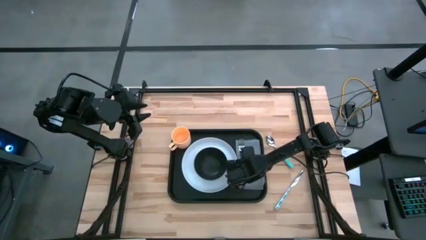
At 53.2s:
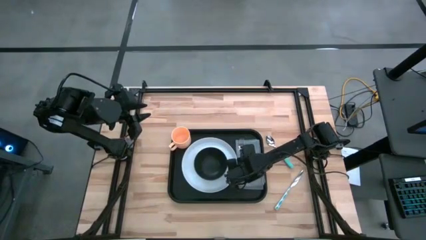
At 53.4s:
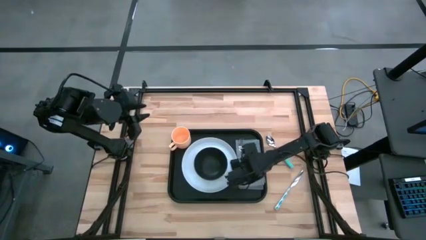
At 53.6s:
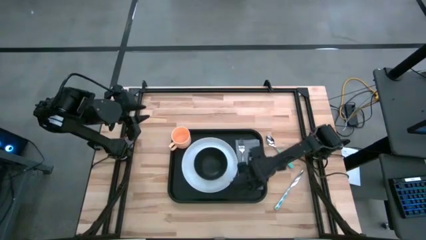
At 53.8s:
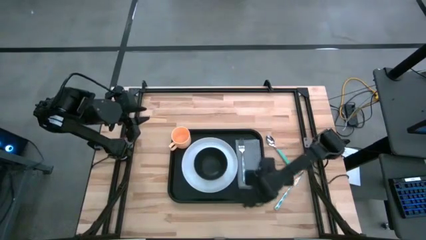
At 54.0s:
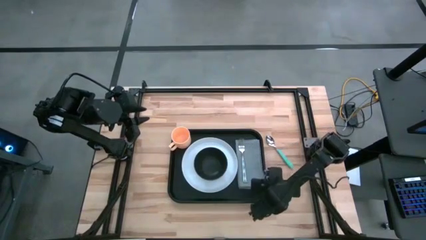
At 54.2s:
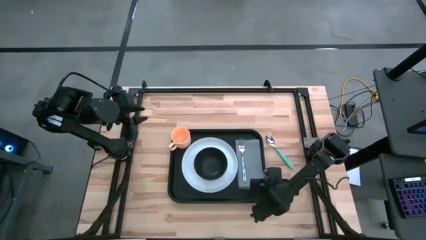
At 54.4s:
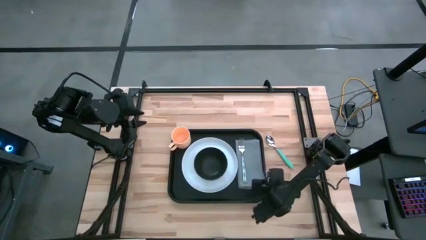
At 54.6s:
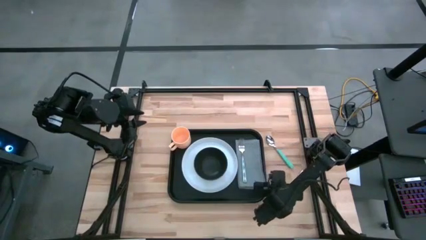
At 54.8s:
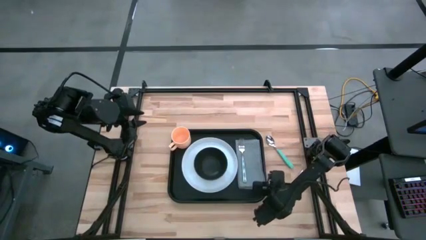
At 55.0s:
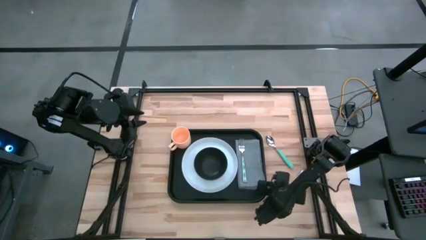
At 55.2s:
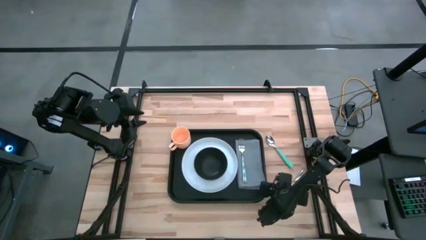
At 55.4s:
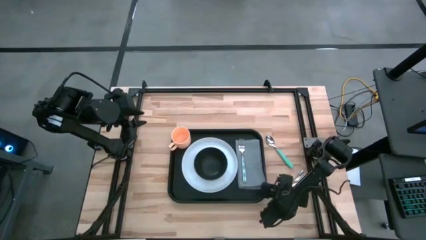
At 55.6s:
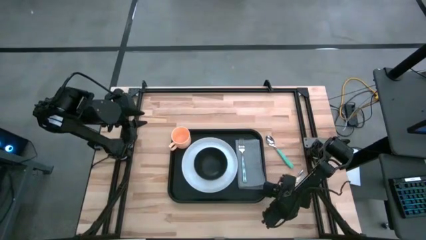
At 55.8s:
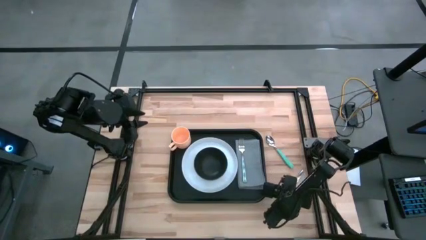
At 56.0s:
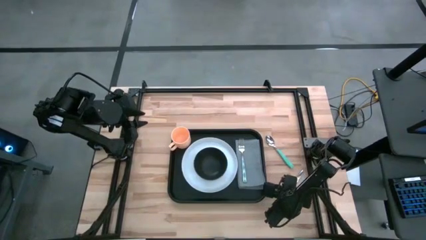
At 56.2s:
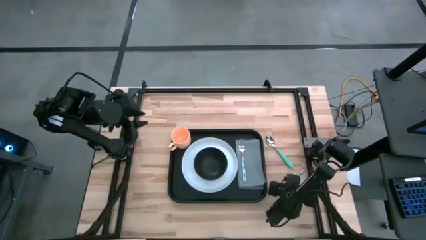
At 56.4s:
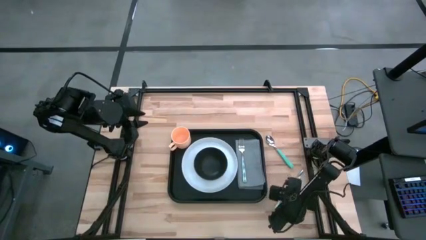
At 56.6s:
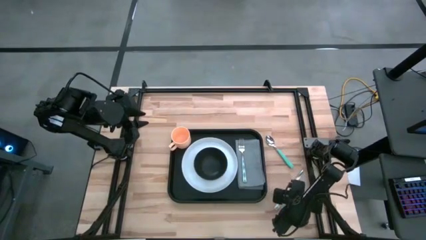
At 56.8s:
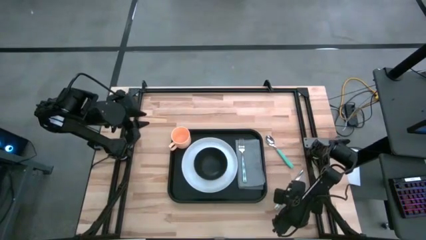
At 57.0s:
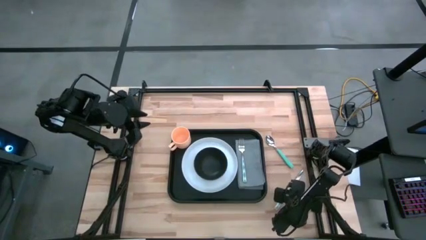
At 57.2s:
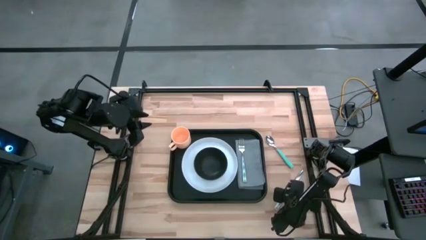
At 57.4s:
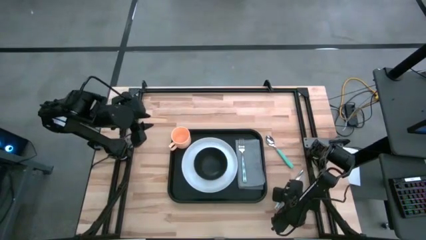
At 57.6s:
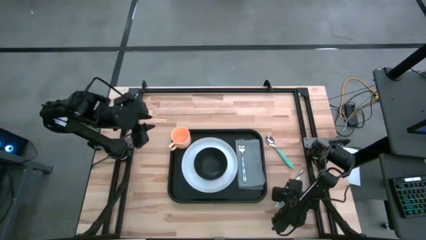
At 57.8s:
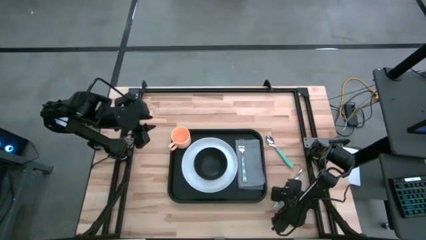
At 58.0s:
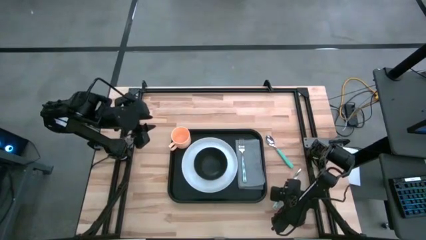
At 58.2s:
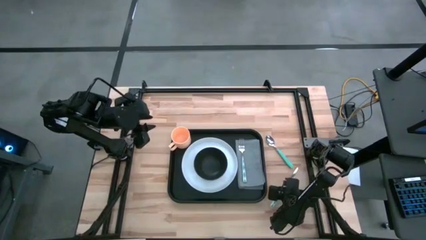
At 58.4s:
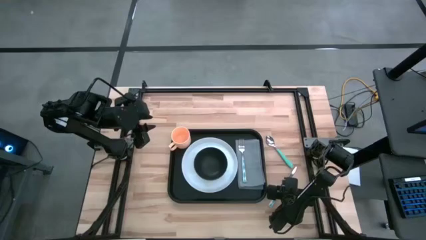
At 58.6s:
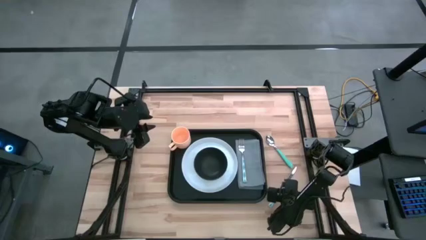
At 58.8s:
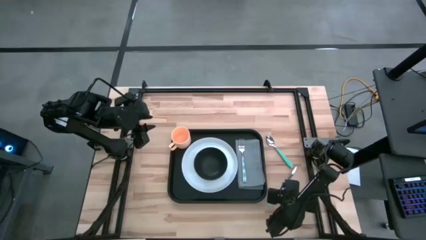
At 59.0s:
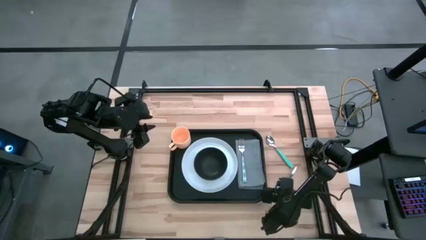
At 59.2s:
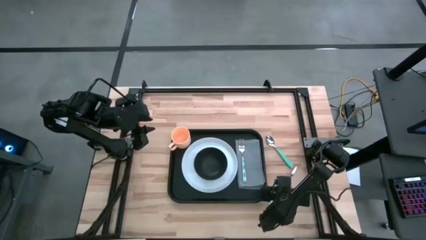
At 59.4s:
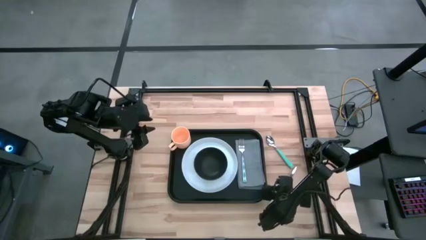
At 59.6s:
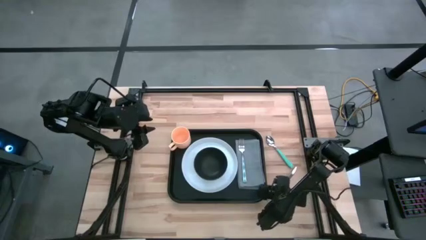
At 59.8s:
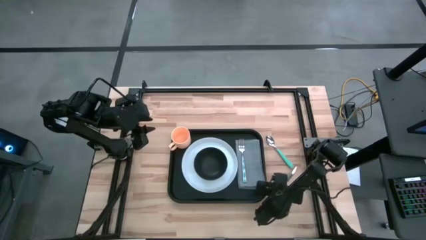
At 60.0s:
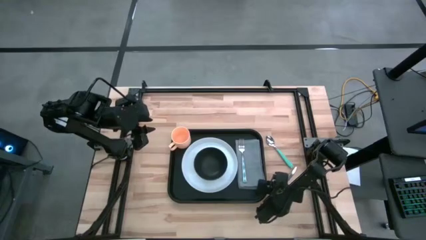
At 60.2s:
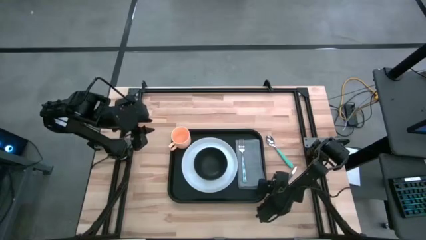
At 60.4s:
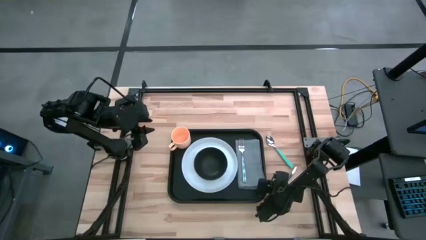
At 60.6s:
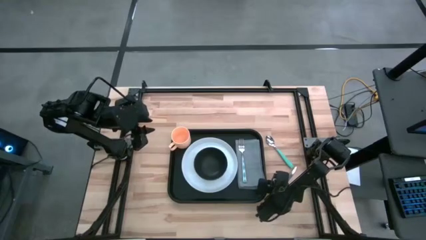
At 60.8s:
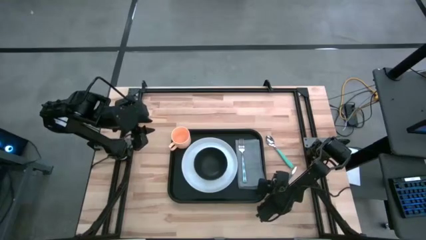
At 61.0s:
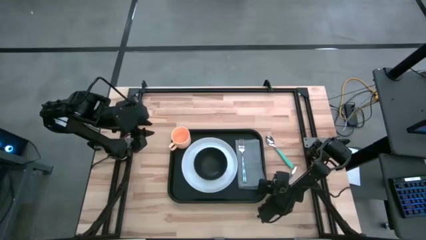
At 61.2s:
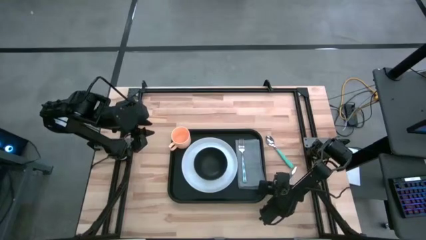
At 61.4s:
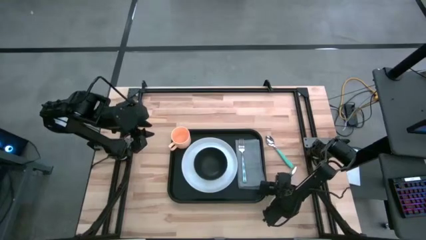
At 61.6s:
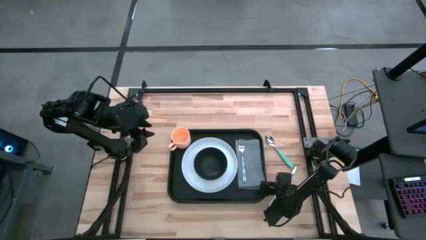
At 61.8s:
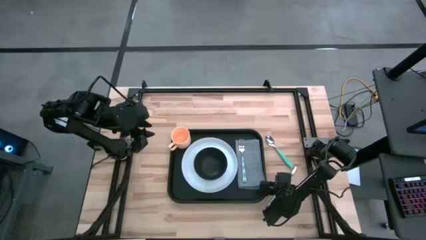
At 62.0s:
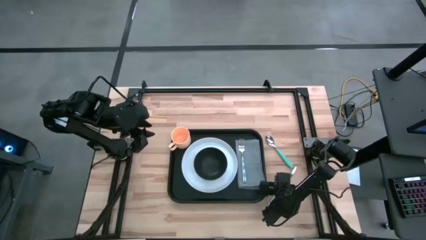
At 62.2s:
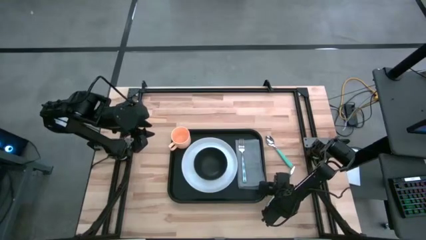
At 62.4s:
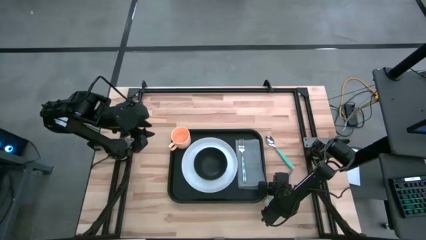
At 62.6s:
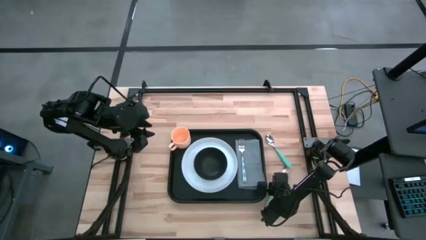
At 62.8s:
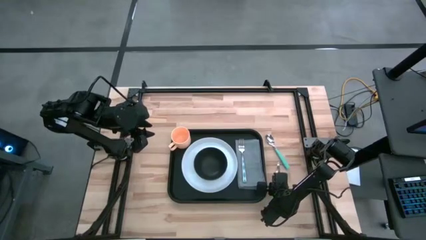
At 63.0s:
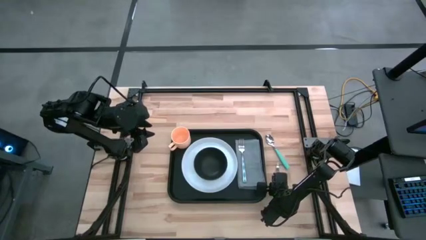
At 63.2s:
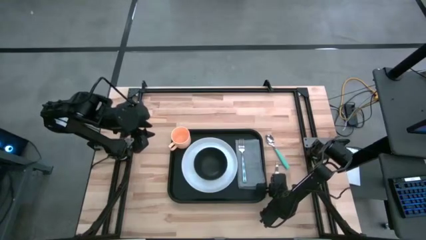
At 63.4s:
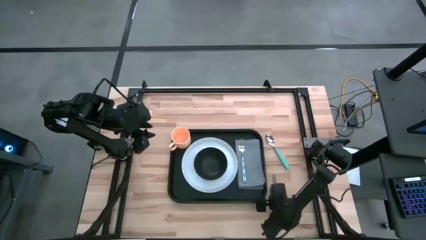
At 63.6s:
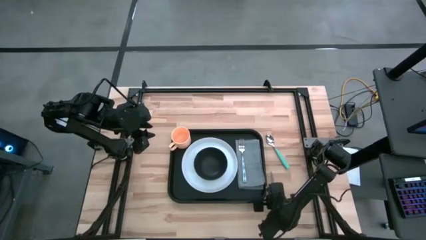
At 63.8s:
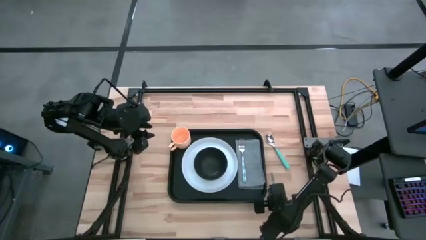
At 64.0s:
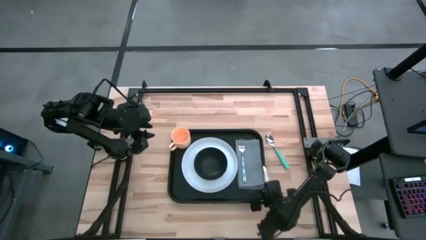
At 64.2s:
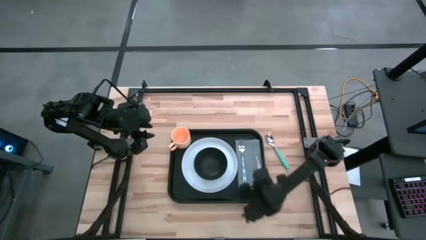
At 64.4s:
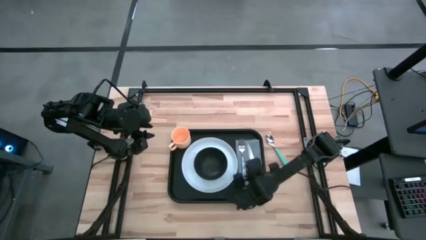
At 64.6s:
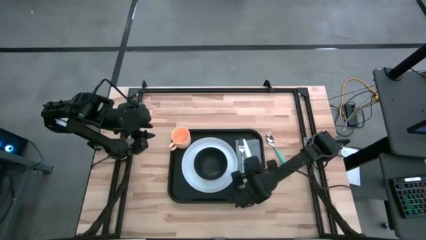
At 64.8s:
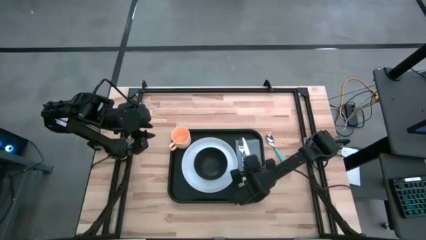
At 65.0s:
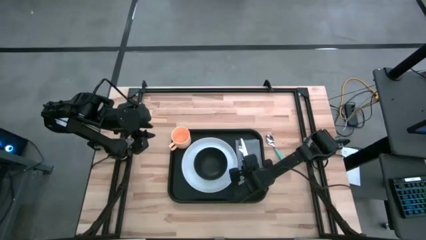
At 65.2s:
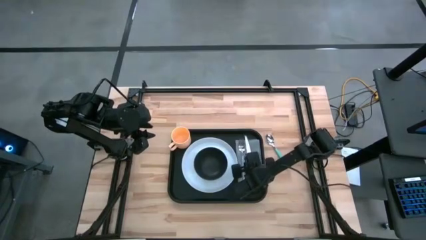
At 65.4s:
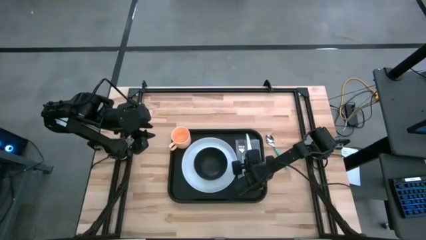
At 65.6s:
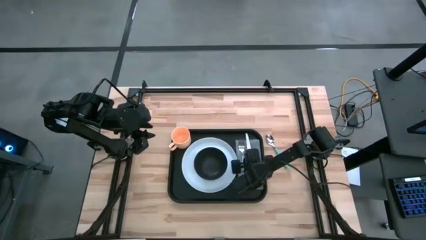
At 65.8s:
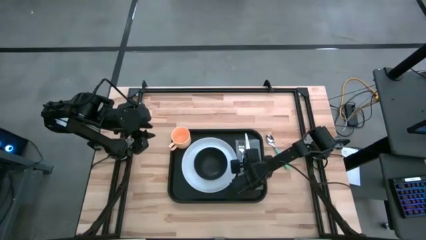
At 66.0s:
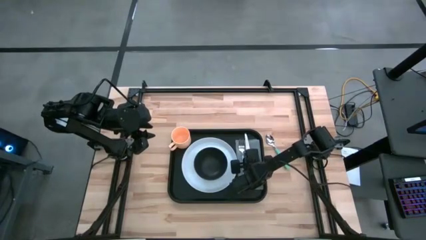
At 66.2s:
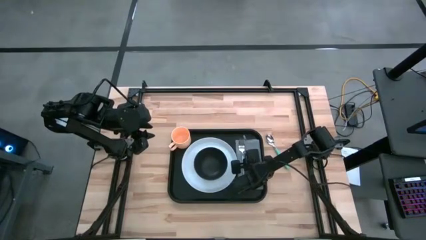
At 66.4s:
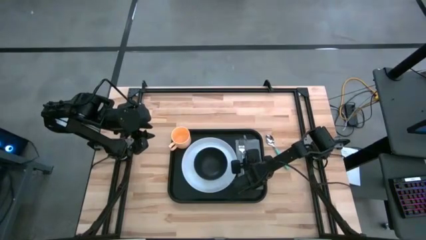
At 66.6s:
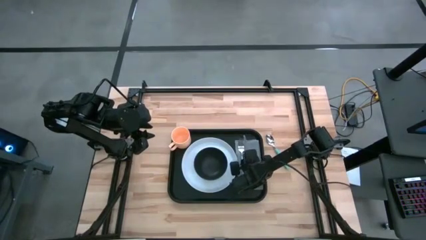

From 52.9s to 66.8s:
Task: Set up tray
Put the blue patterned knife on top of the gray napkin to the right of the blue patterned fork

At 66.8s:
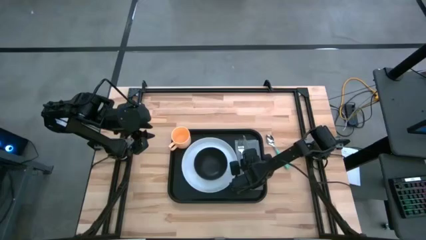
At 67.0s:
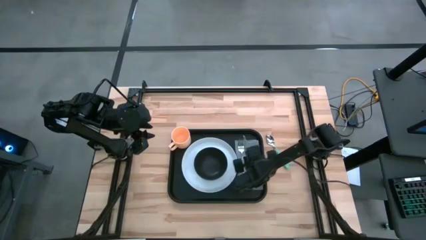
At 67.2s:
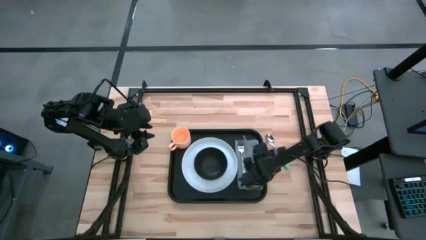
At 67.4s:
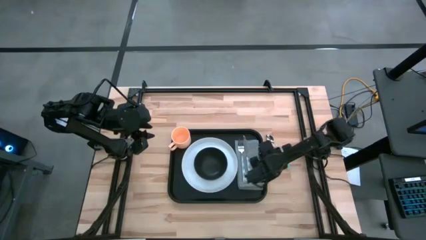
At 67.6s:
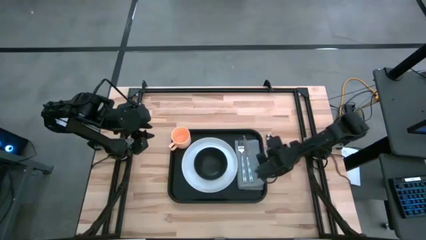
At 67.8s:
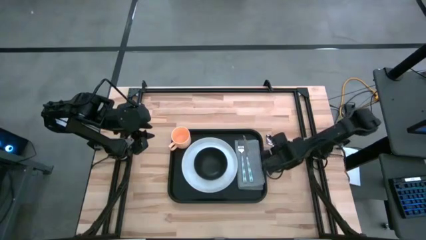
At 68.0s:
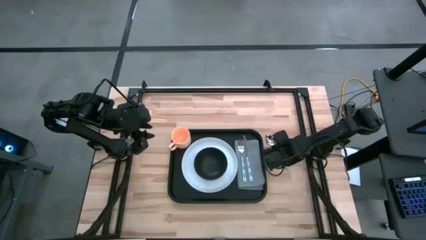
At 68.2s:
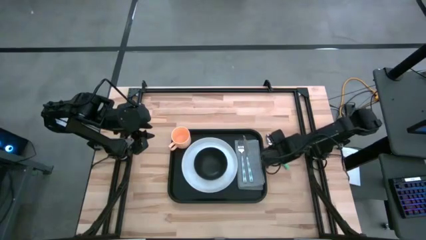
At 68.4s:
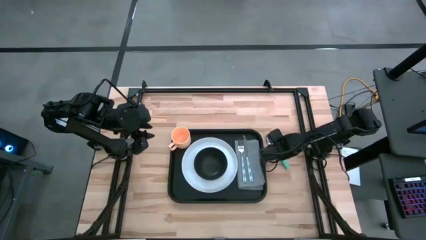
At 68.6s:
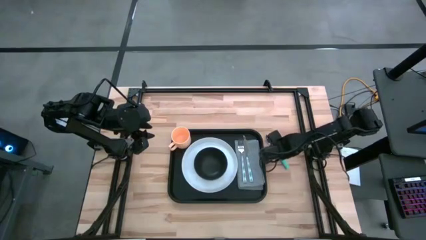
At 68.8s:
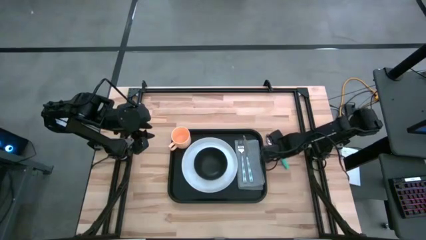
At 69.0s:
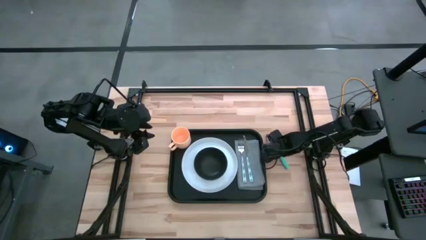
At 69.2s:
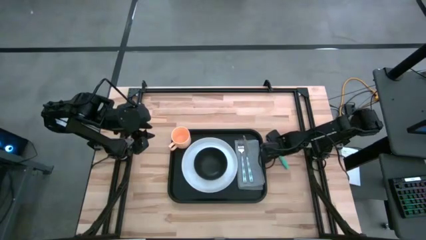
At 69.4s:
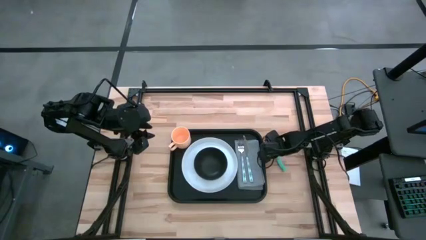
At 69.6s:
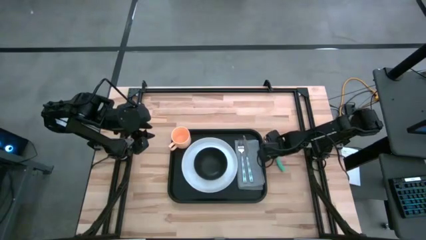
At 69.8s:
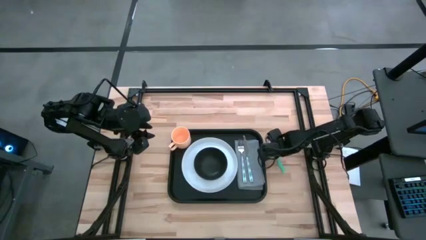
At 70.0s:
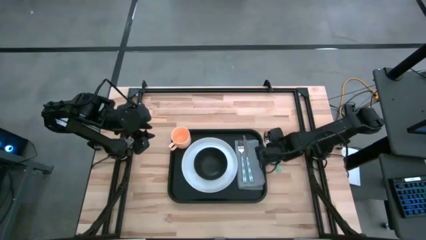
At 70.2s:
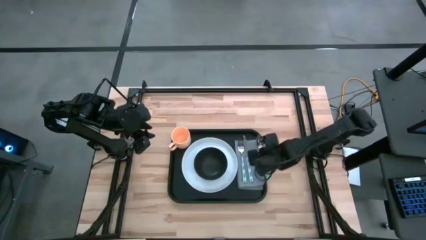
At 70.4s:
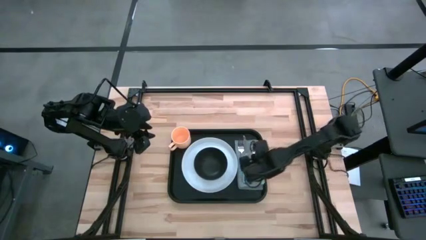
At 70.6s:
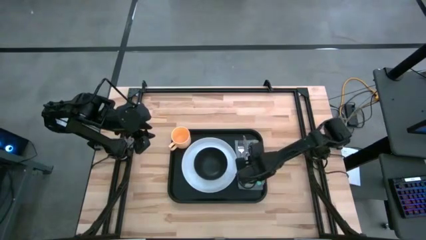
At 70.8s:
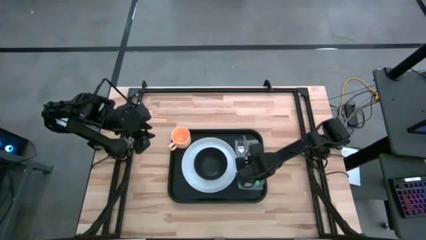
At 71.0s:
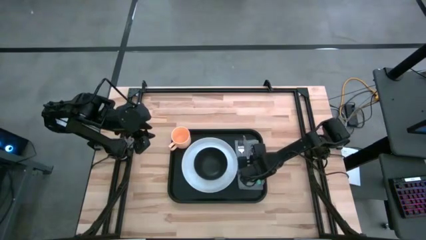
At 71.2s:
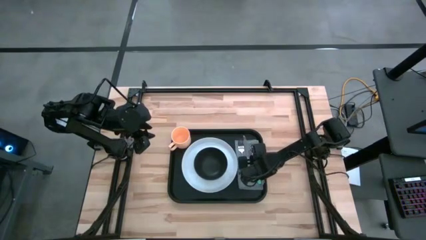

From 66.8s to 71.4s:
Put the blue spoon on top of the gray napkin to the right of the blue patterned knife
